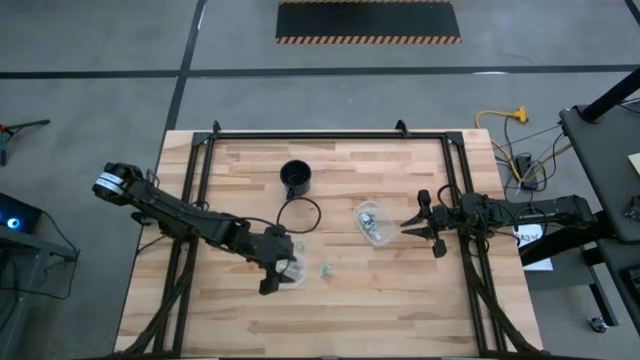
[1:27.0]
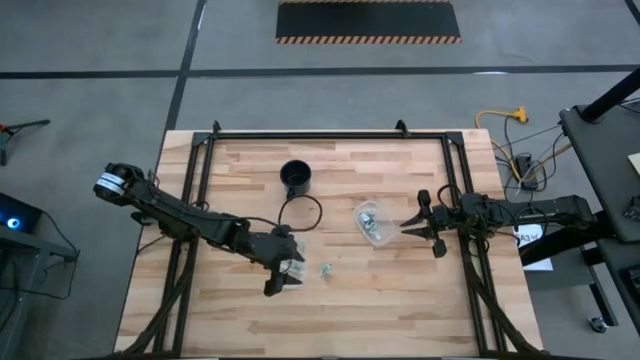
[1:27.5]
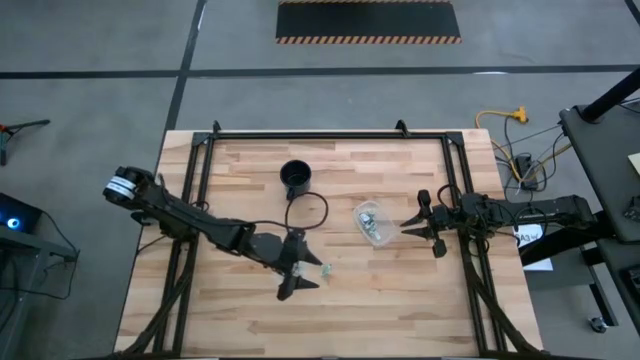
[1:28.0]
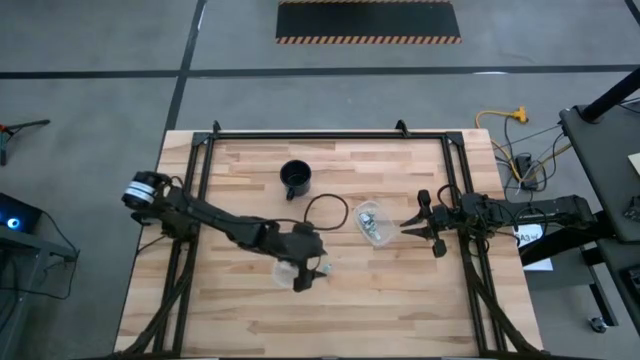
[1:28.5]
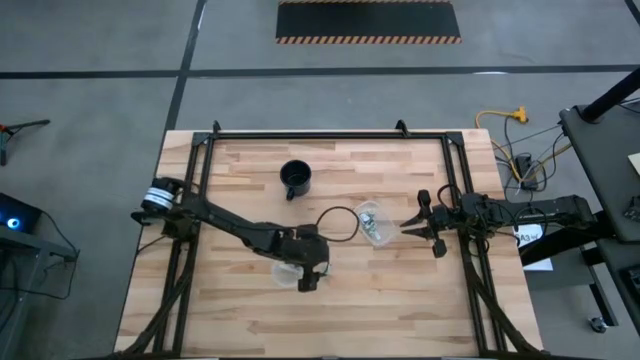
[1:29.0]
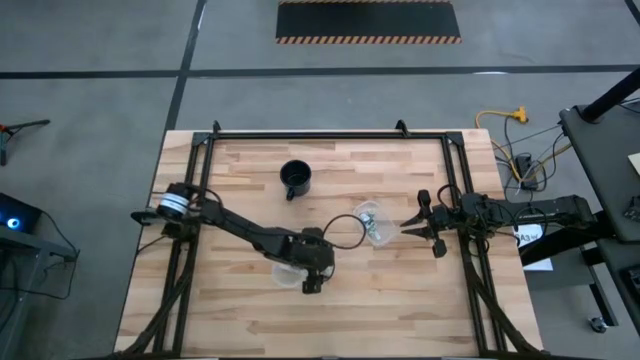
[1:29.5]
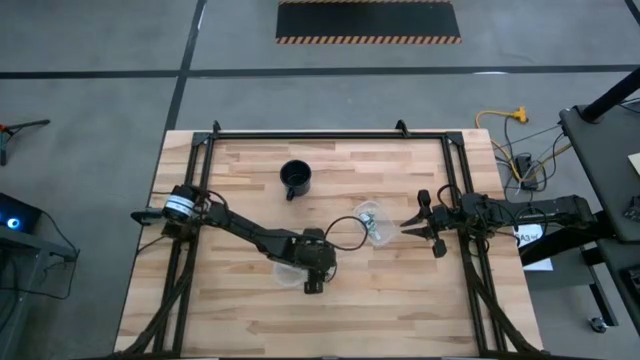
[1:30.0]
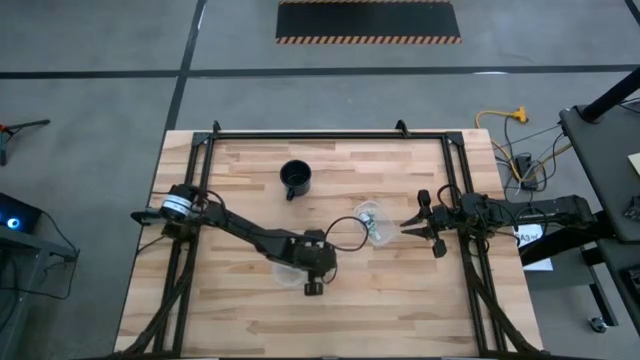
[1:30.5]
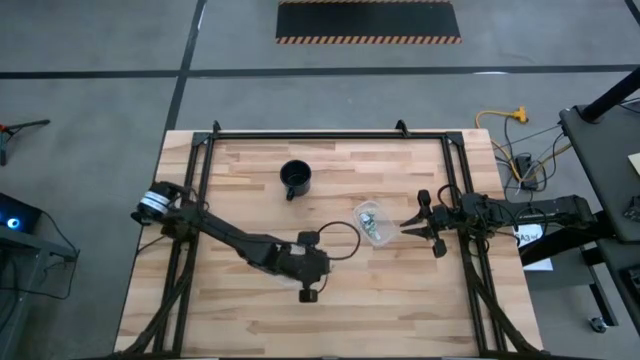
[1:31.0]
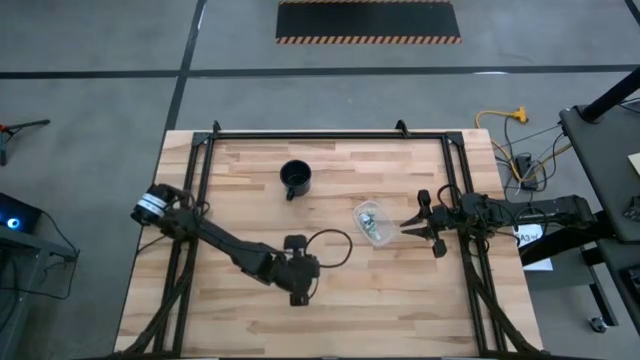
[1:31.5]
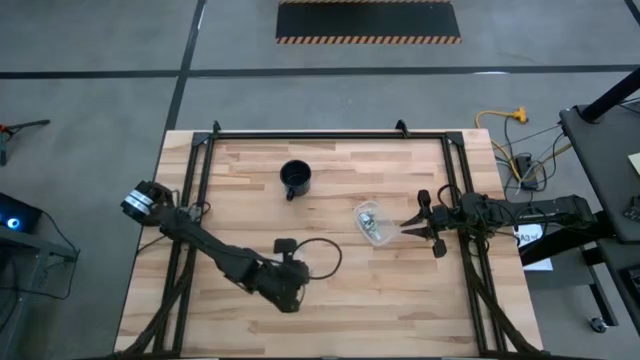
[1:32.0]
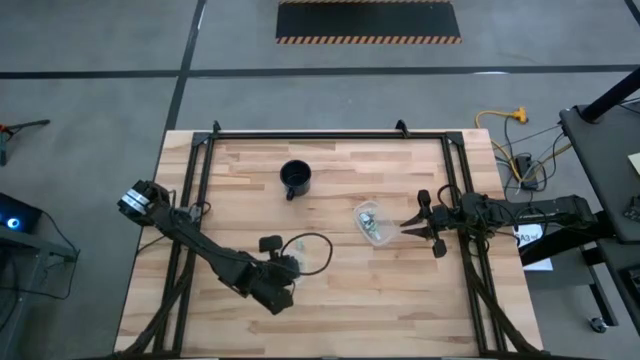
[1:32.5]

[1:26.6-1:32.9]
Task: Pick and place Stevia / Truvia into bins
Put the white stevia packet into the bottom transparent container

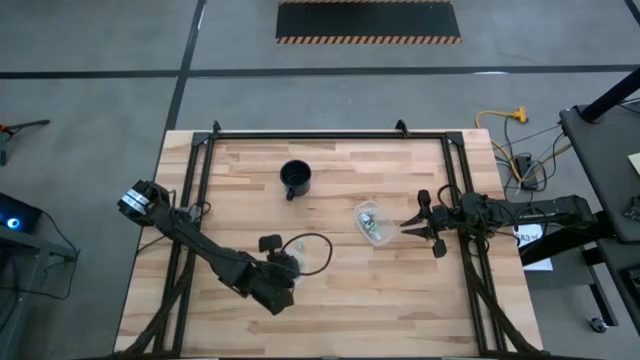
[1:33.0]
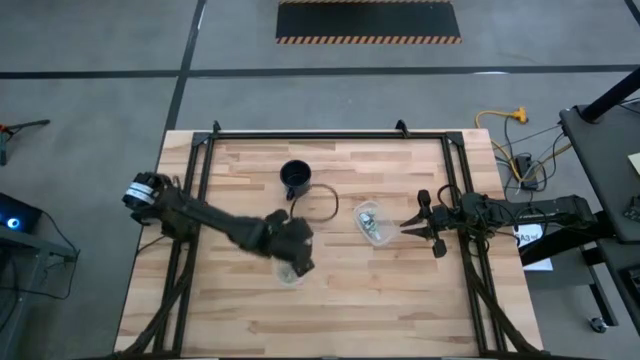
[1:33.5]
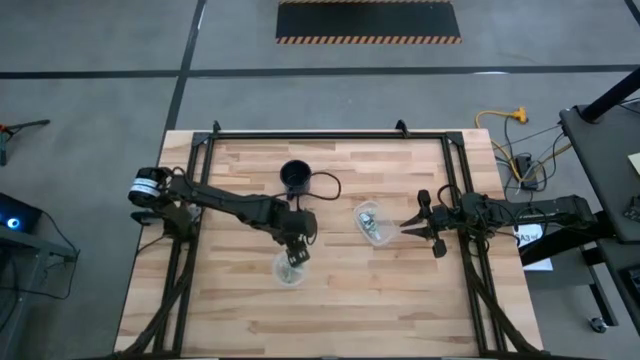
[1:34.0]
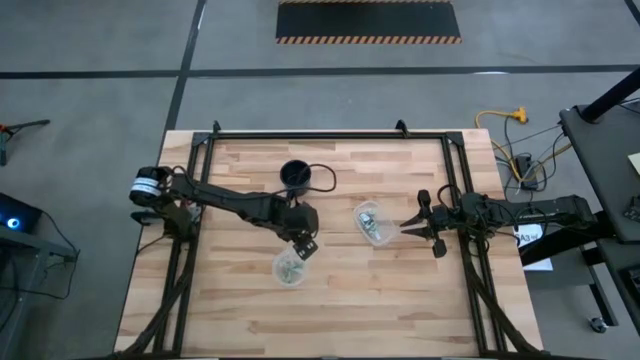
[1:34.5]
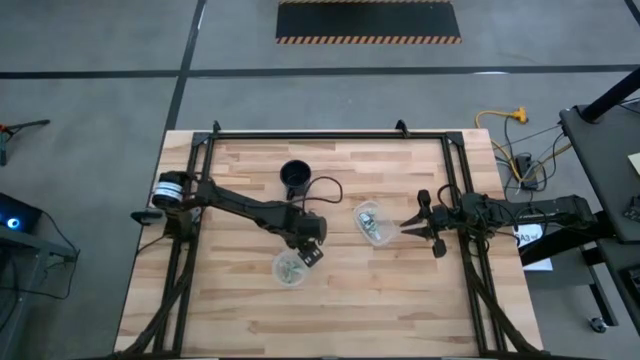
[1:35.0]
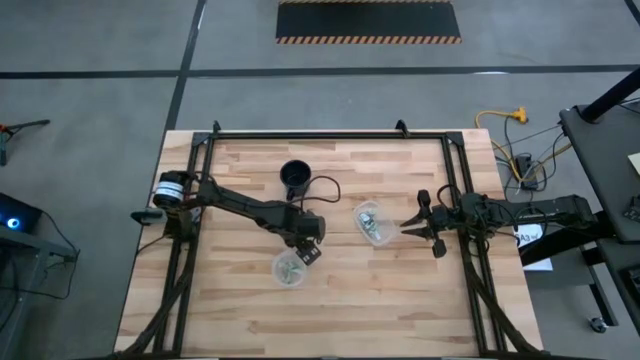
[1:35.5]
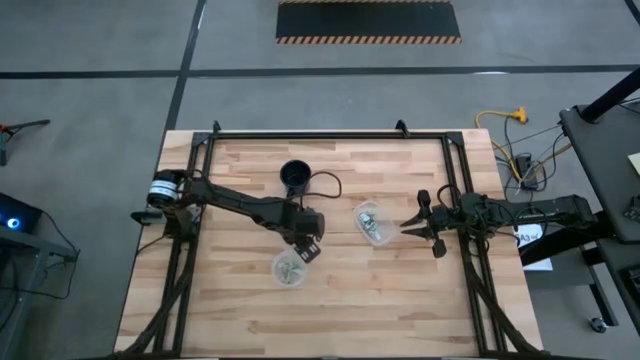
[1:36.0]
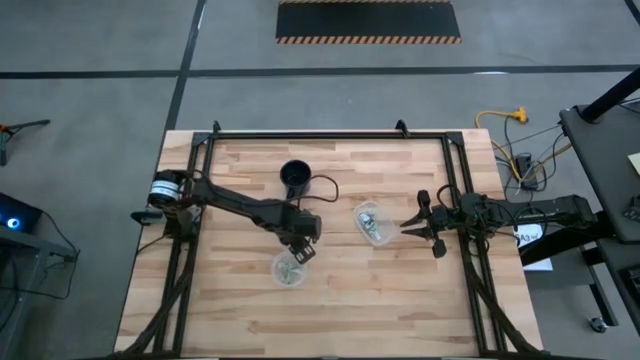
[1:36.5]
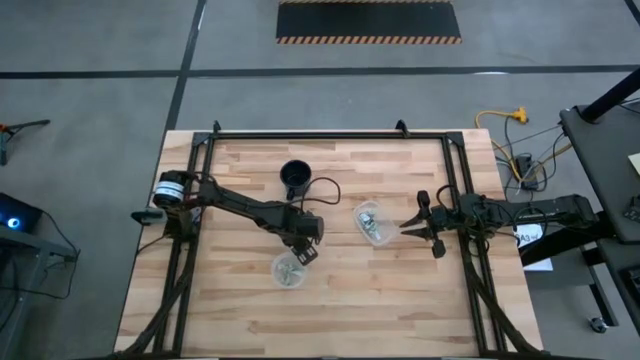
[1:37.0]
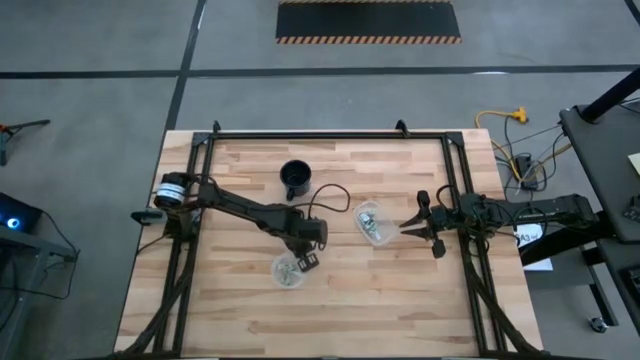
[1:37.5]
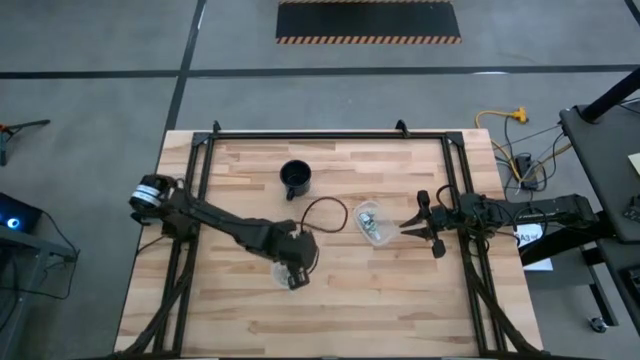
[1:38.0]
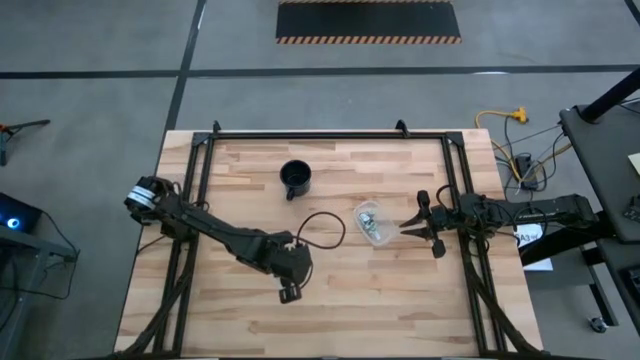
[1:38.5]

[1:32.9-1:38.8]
Put the white stevia packet into the bottom transparent container

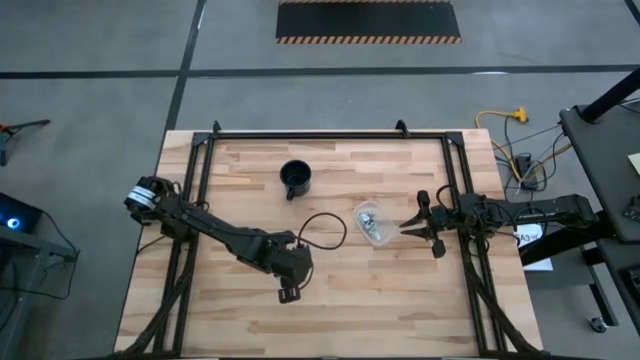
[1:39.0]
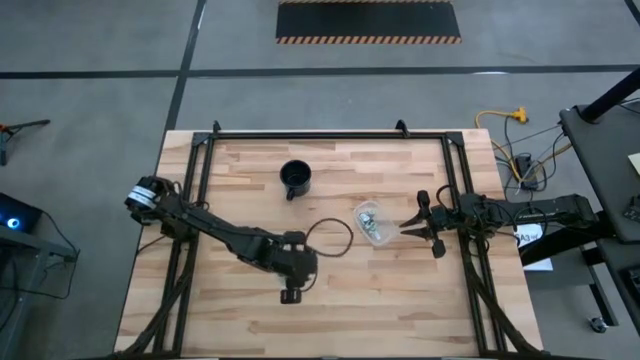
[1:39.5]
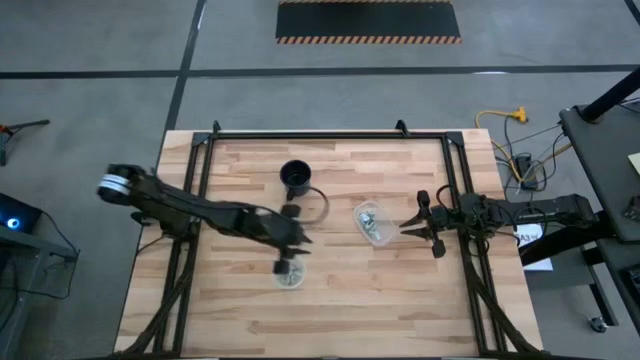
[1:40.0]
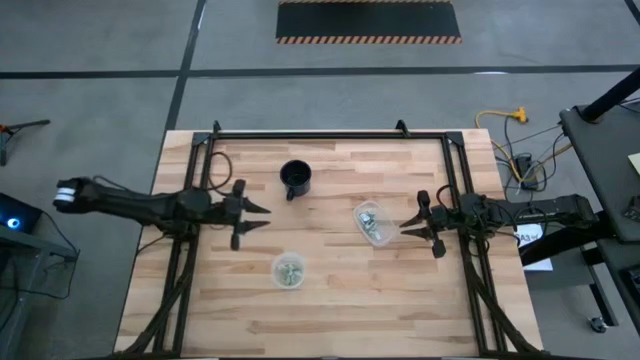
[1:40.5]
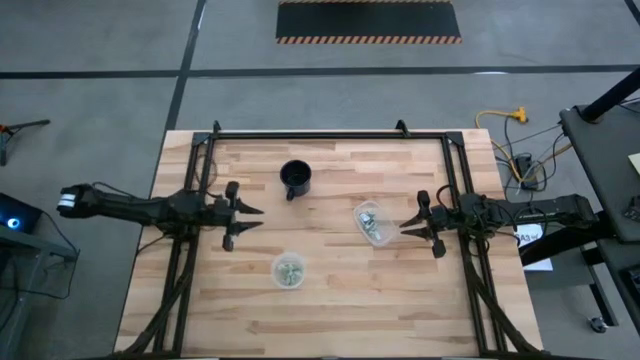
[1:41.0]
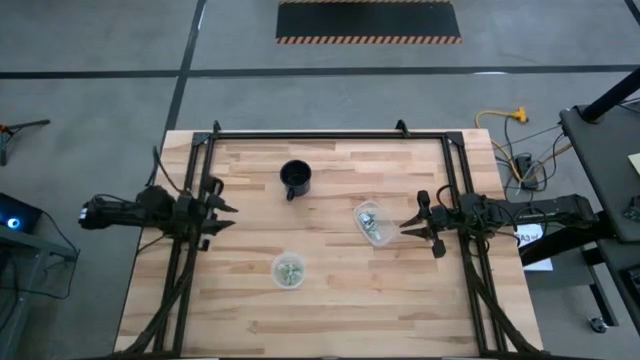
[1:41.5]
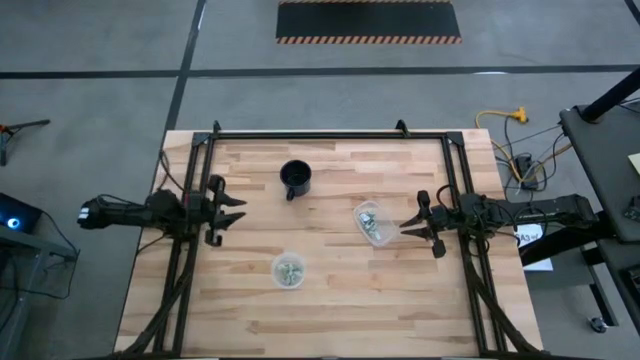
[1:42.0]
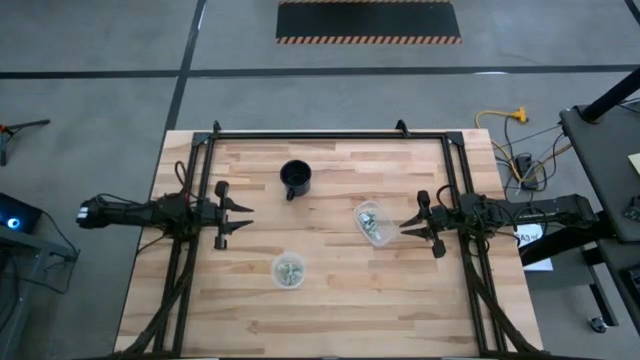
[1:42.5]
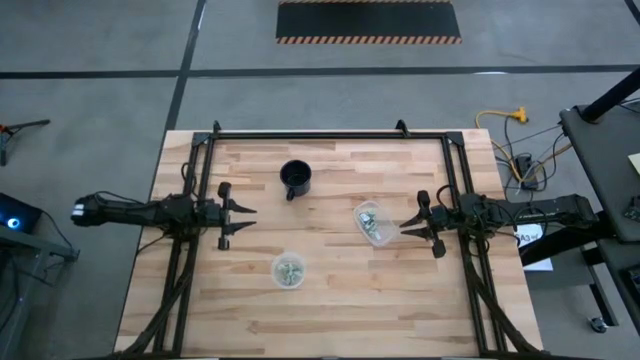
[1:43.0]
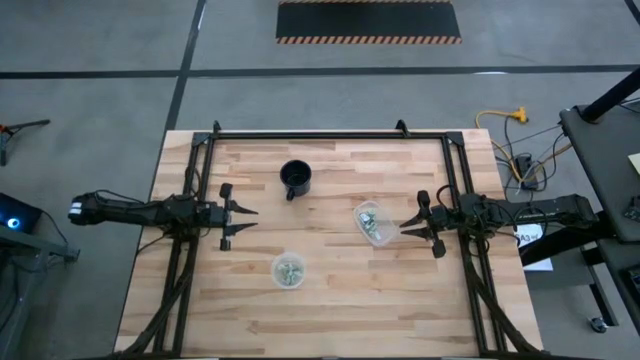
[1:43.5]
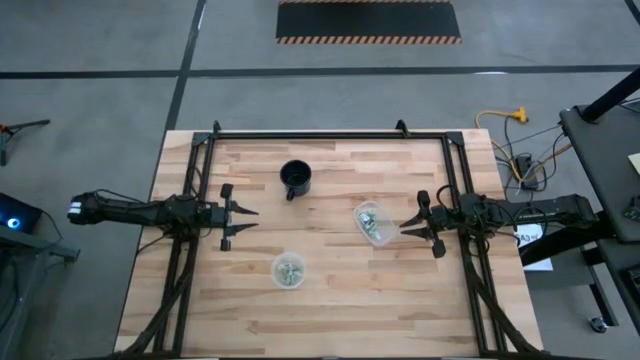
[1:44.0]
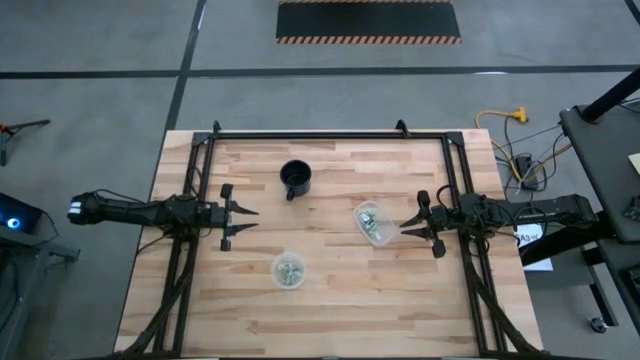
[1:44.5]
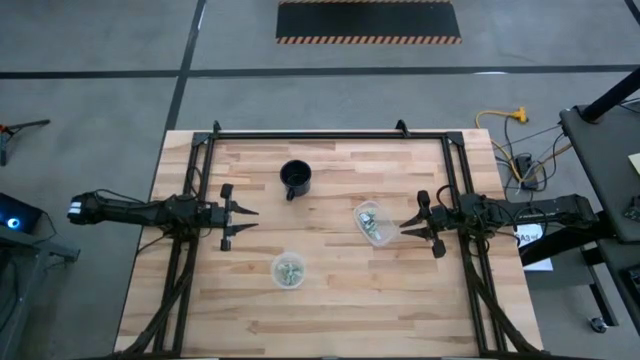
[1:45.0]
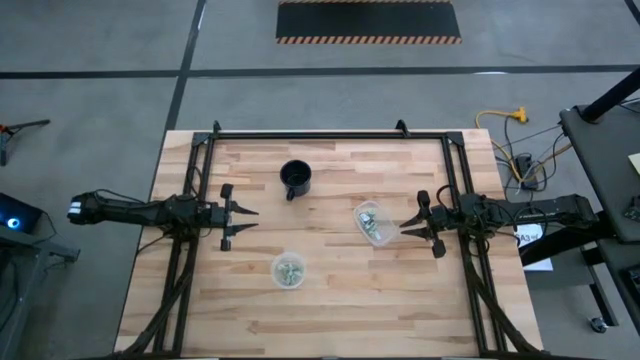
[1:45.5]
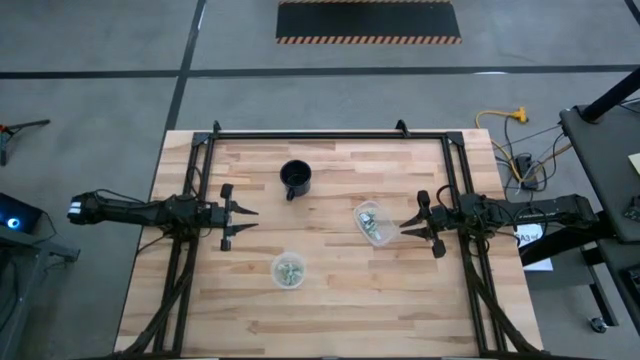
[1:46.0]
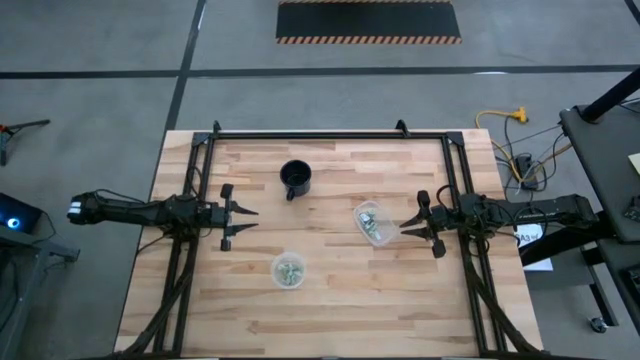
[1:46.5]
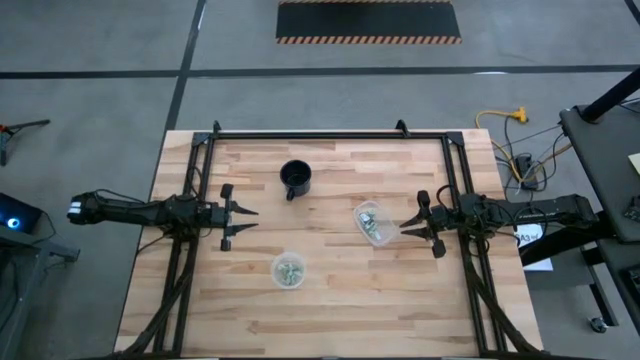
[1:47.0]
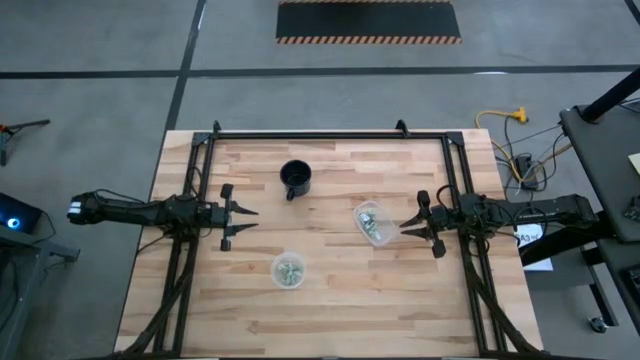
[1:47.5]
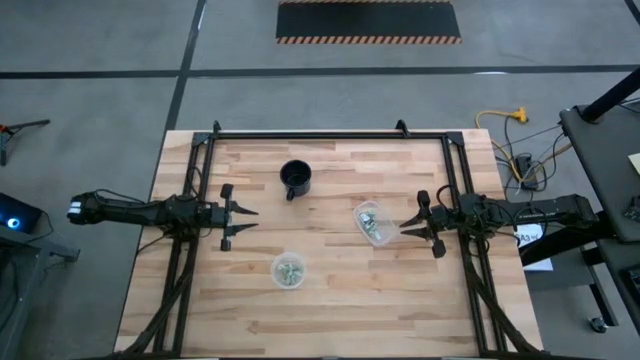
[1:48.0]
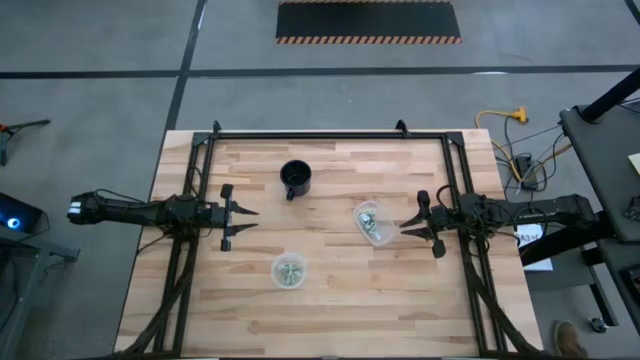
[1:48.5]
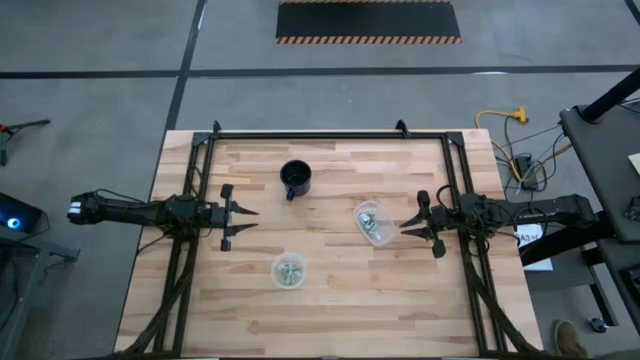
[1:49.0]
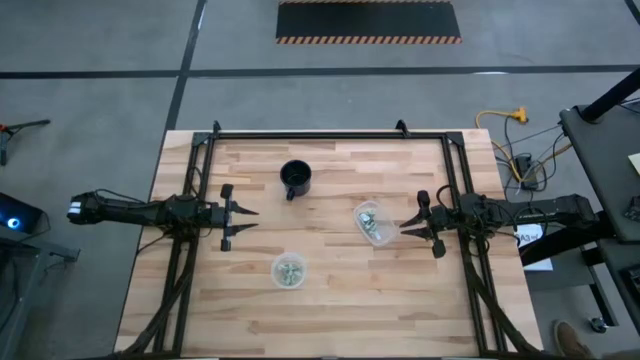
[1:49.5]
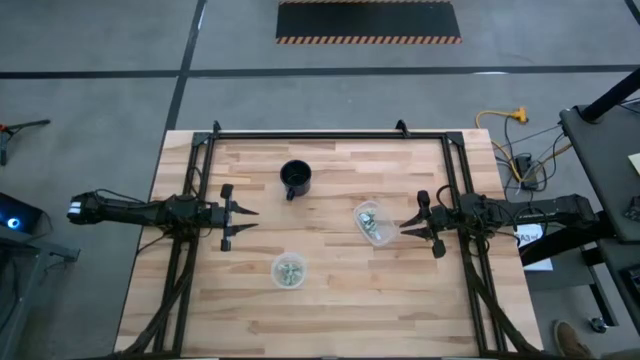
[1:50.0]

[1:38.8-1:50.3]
Return to Home Position
